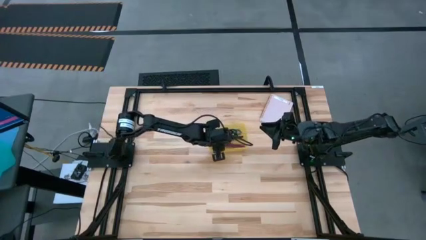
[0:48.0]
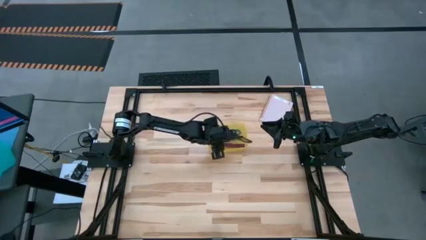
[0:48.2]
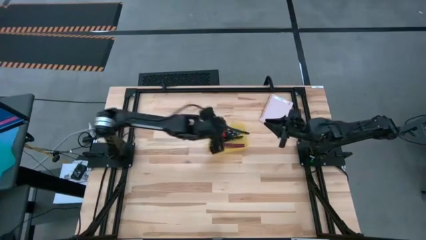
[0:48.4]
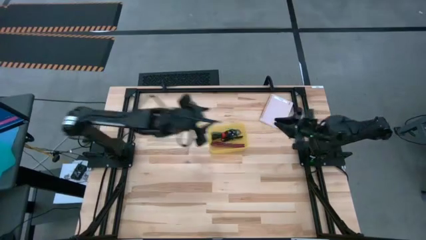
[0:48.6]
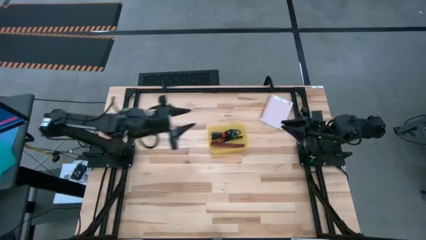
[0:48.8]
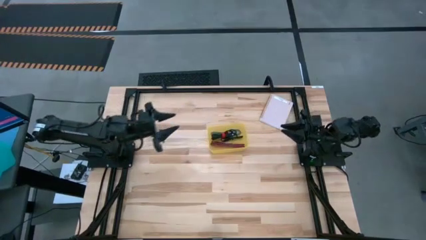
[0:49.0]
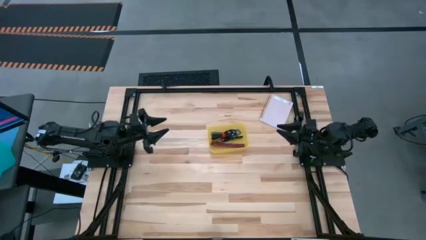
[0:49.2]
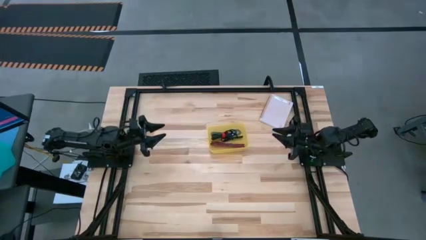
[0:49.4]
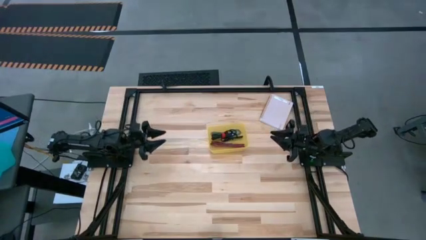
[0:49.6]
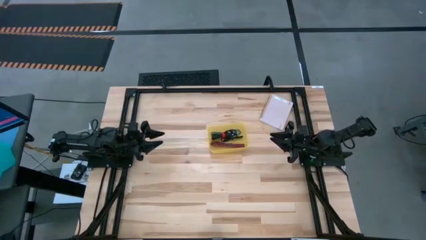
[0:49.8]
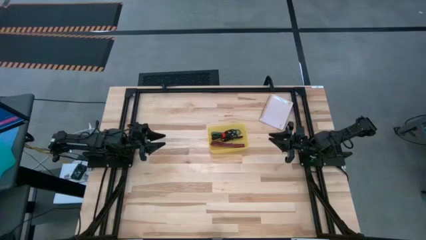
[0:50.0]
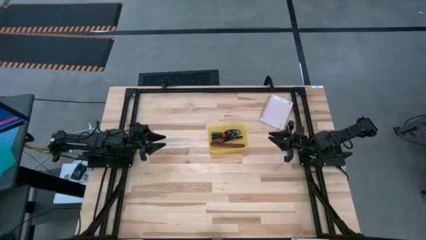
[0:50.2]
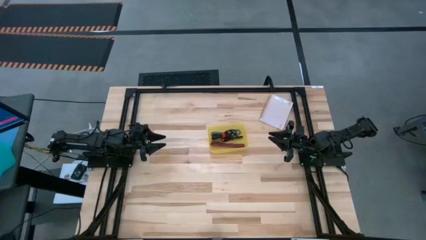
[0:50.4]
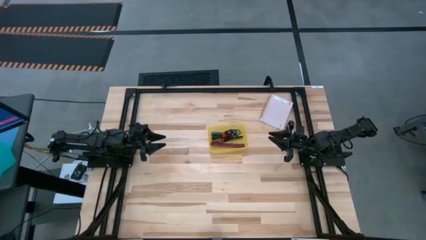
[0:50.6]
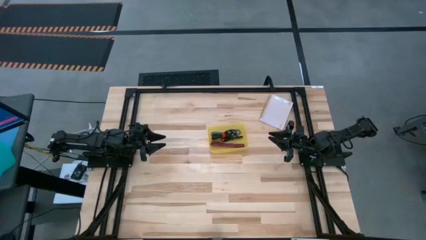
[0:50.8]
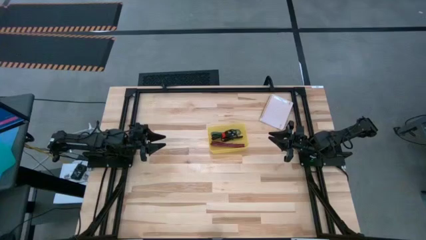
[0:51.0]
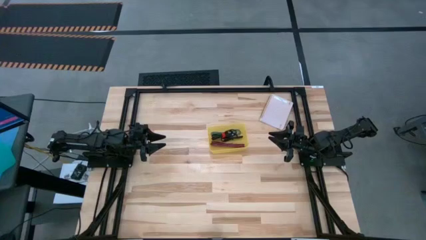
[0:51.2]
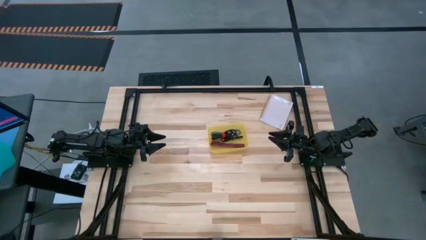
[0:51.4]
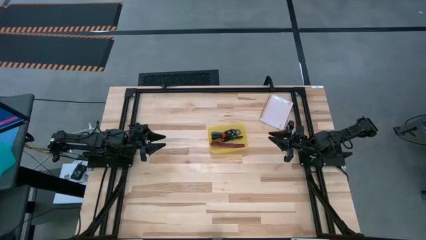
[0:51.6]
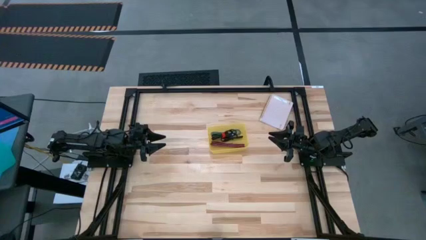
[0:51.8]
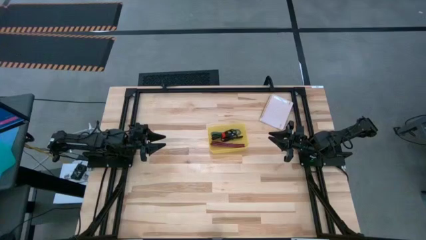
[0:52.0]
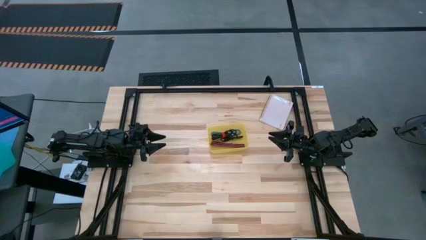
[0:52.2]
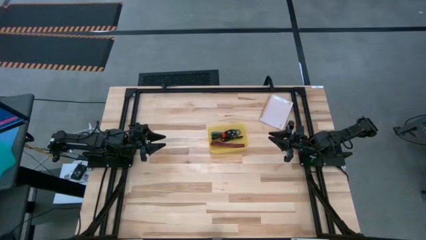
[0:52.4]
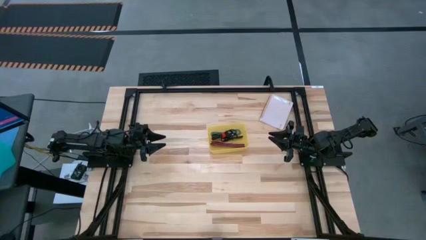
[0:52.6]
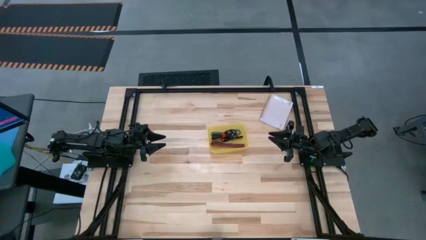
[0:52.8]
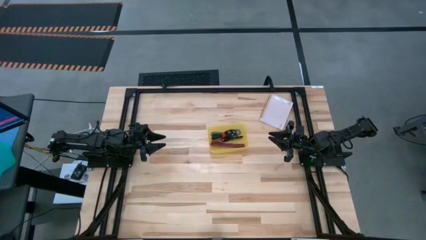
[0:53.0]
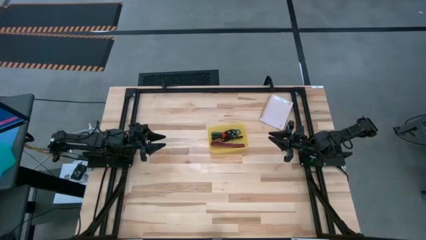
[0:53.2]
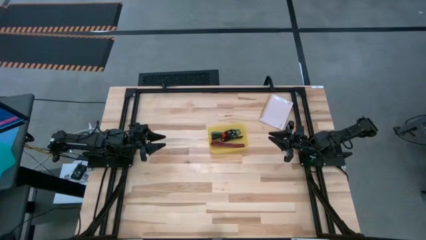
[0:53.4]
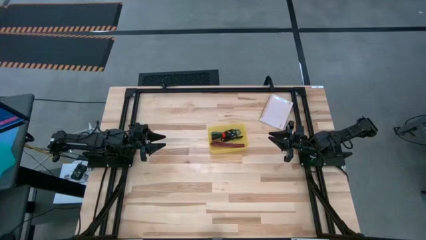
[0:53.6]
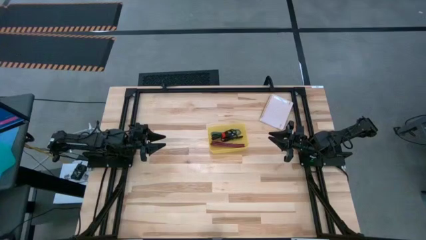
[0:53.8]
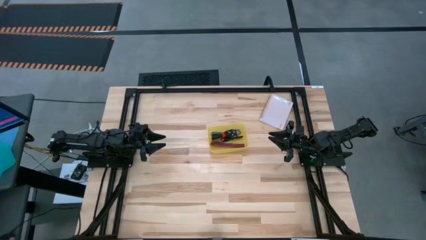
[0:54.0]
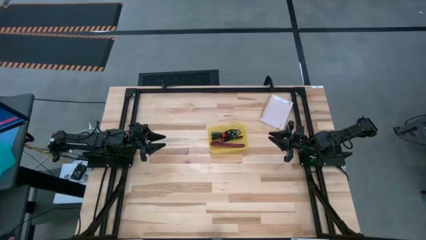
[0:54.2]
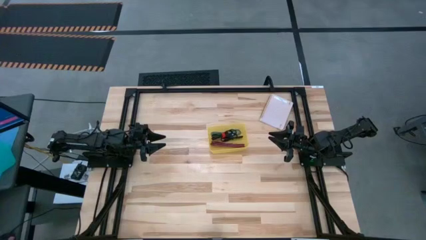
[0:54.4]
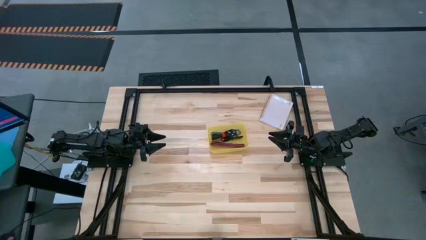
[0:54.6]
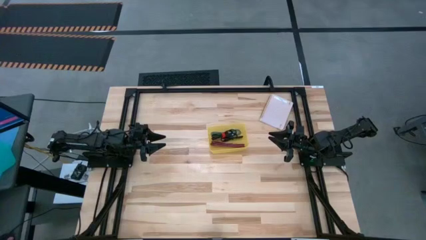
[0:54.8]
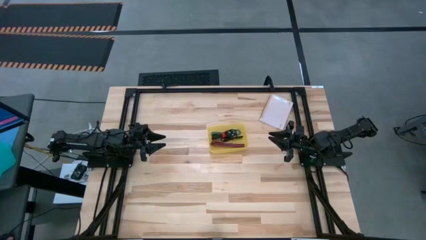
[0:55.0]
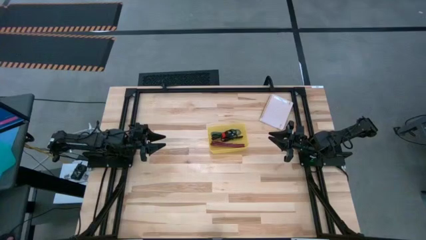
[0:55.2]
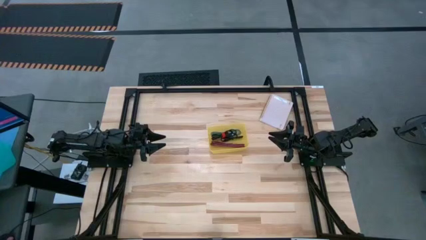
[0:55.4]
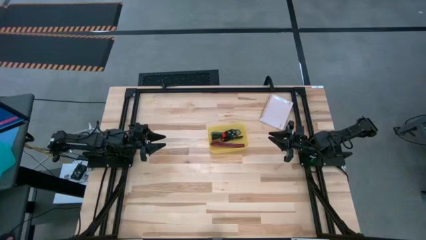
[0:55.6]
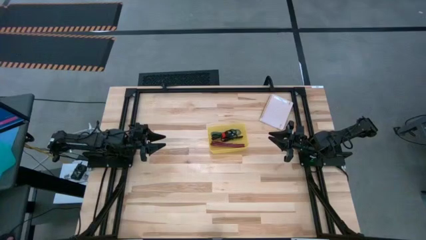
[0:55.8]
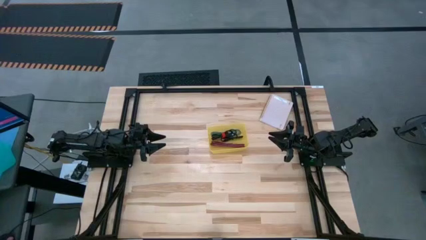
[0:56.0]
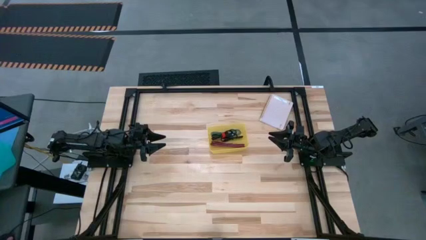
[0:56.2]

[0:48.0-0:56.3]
Task: Pick and place USB-C Cables
Return to Home Position

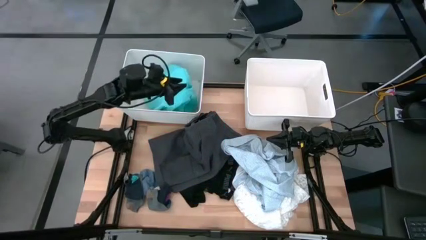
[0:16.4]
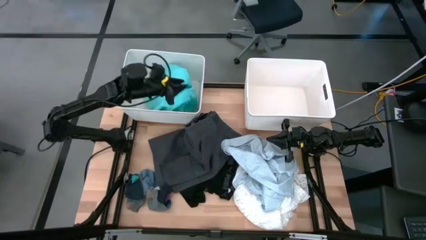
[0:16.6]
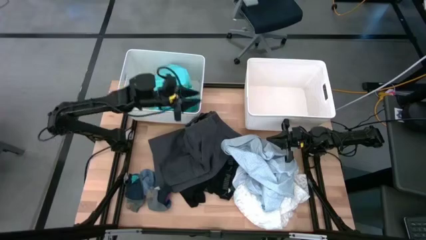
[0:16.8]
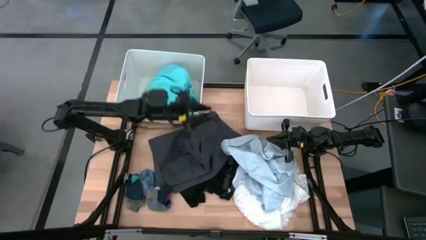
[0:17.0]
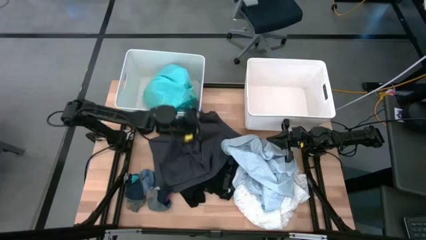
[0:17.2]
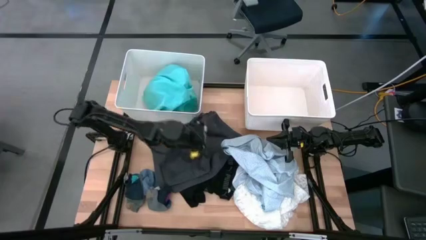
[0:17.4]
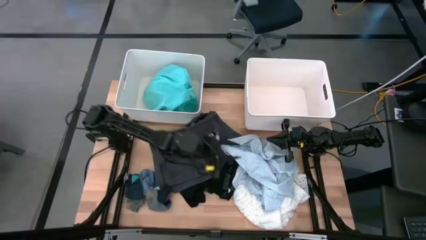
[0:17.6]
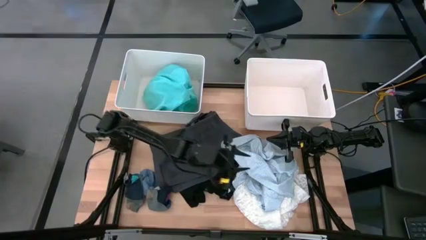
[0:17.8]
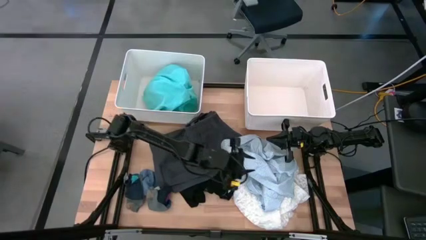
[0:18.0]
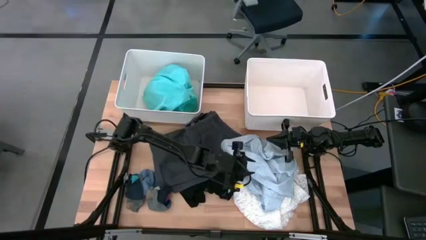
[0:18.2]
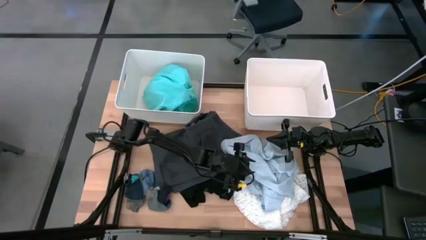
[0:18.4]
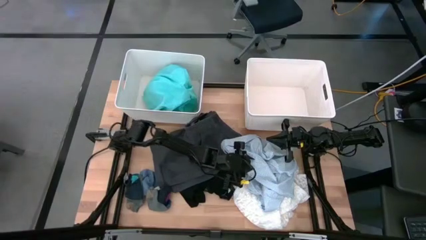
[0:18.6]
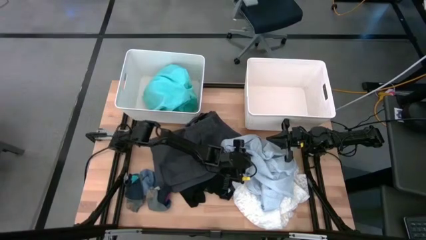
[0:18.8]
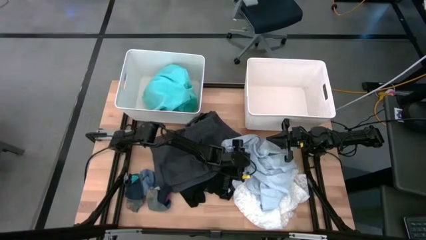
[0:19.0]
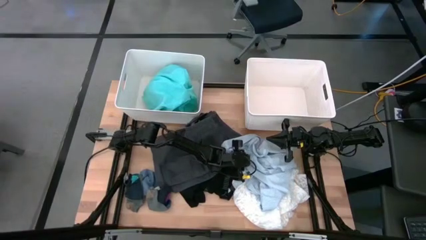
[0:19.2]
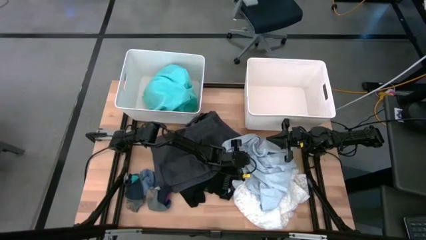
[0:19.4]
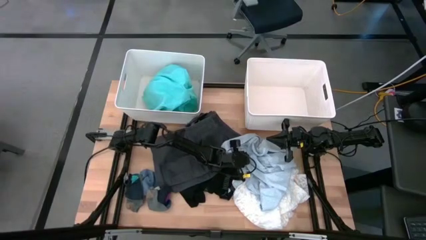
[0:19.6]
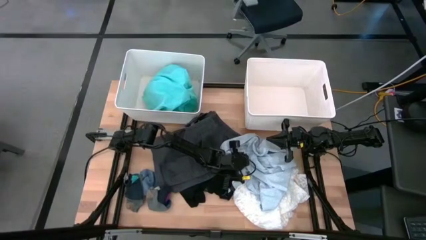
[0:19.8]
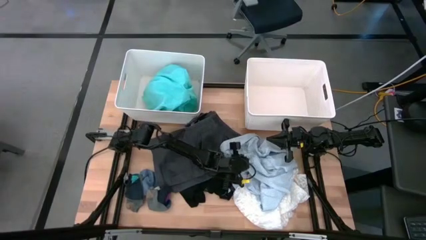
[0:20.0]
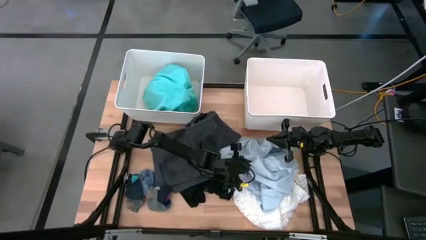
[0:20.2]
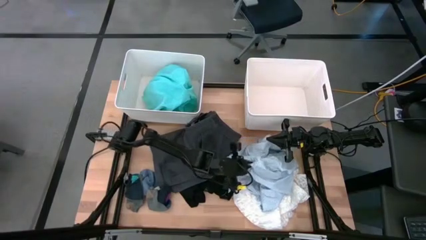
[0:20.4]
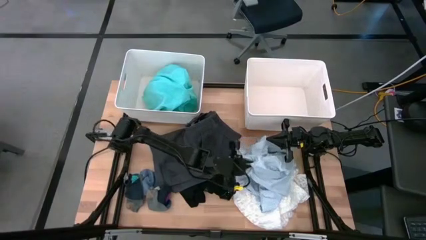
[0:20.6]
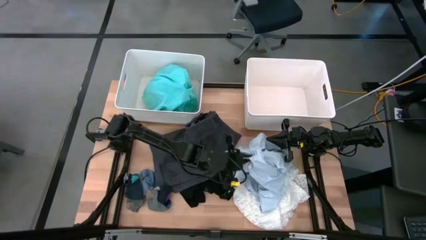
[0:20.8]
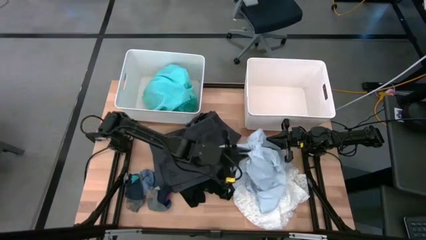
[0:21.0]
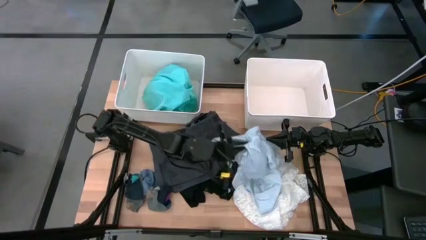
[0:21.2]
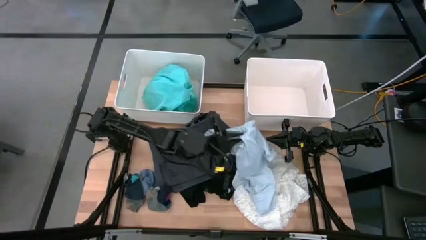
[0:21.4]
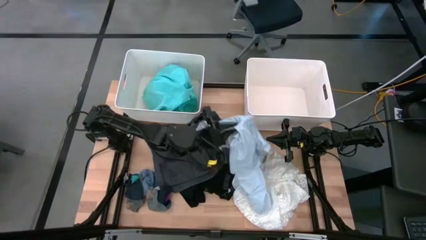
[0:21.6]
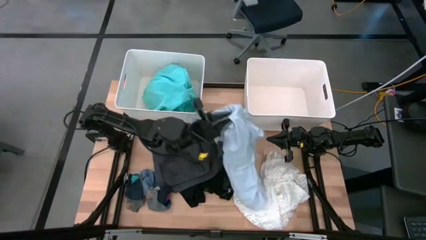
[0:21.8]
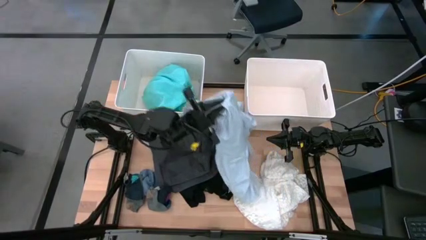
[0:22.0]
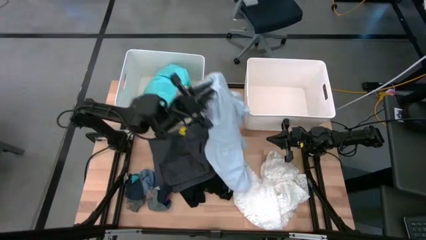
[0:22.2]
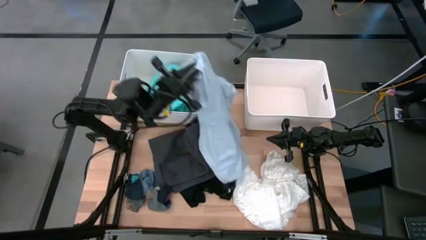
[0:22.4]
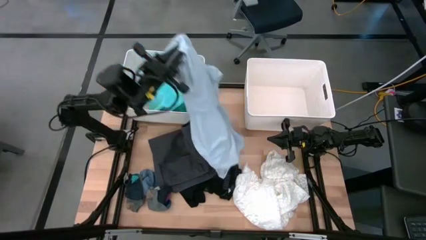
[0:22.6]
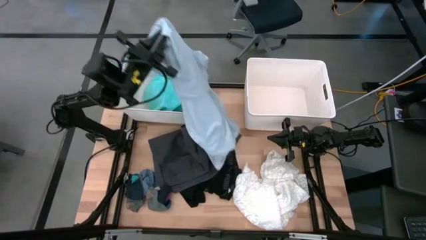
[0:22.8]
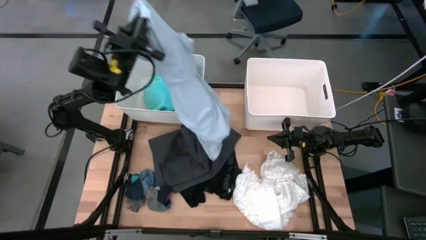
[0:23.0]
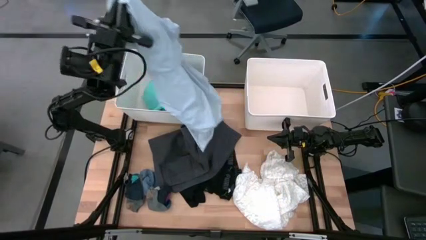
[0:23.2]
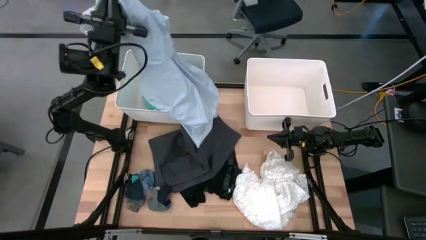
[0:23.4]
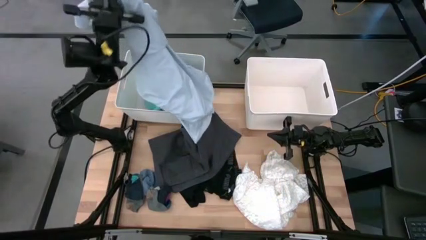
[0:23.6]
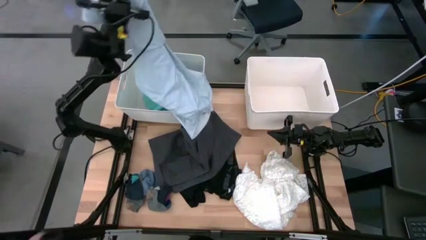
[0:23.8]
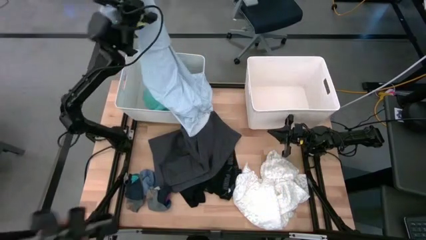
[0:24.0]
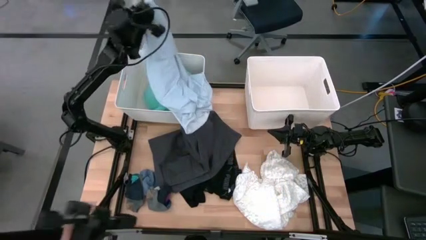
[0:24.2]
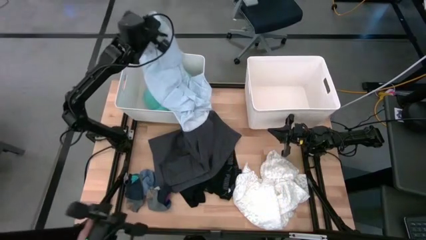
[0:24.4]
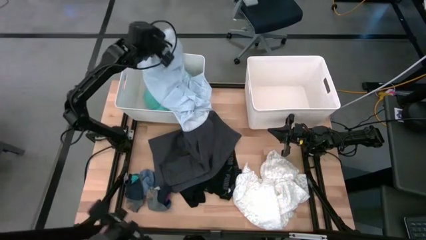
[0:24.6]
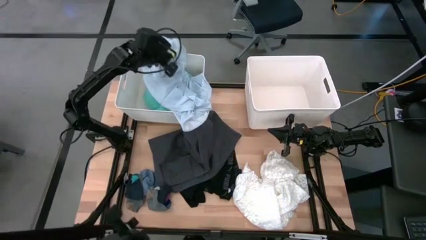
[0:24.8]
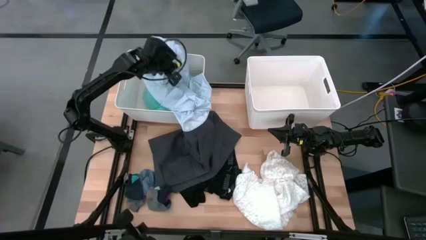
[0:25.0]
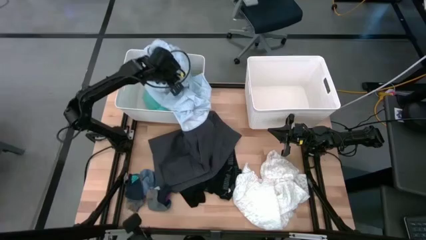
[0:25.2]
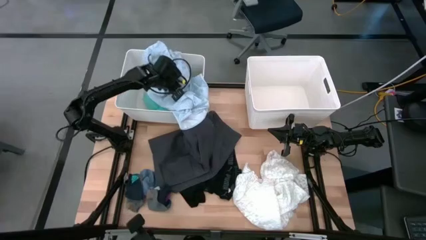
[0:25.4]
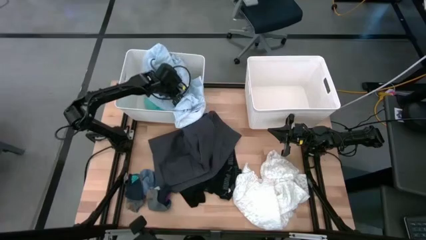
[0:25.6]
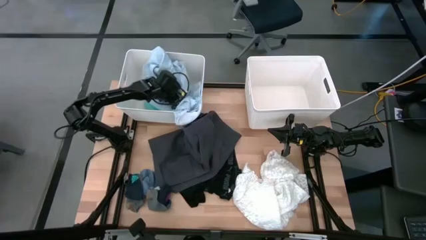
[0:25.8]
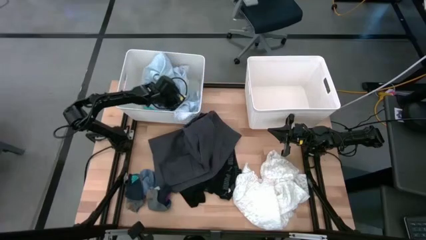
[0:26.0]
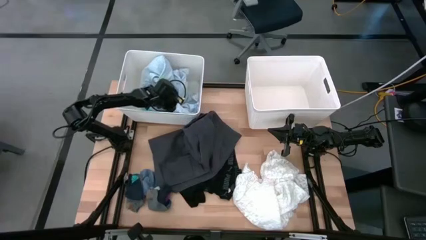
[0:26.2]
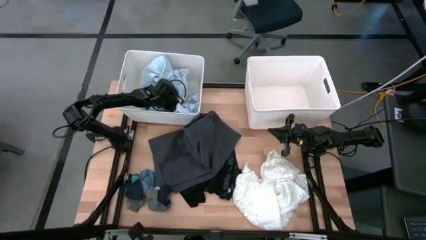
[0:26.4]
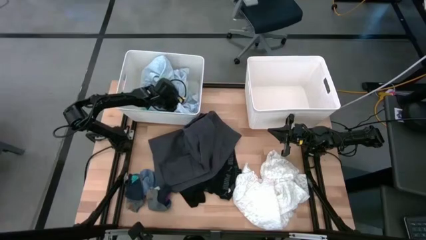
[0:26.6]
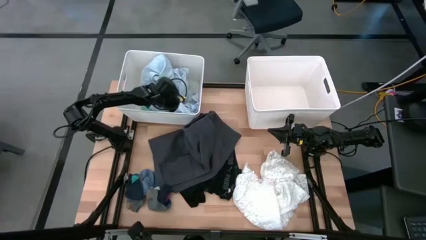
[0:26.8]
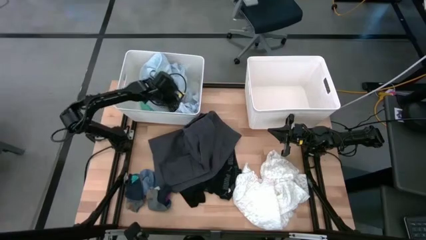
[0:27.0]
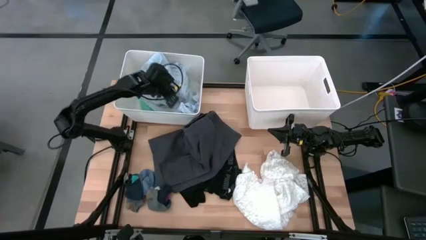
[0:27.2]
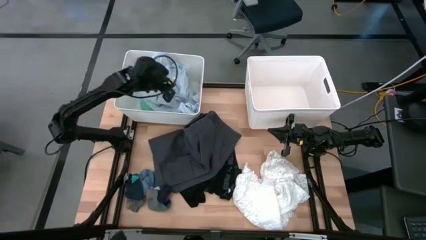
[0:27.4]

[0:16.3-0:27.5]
Task: Sort clothes
Put the blue shirt into the left white laundry bin
